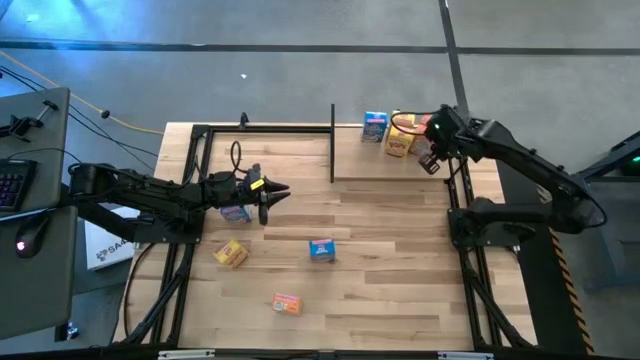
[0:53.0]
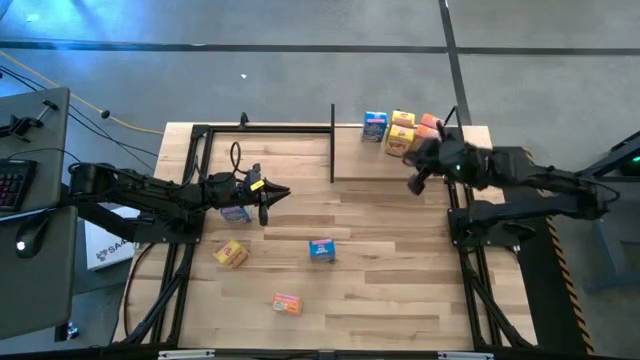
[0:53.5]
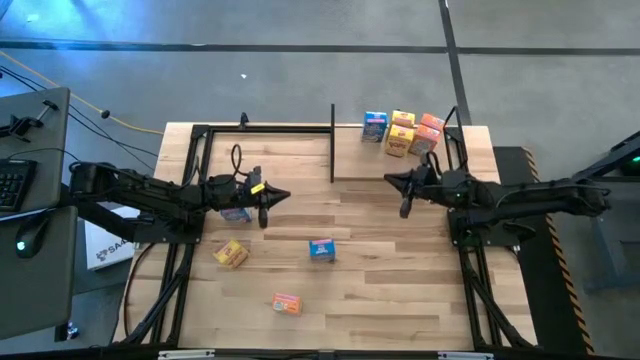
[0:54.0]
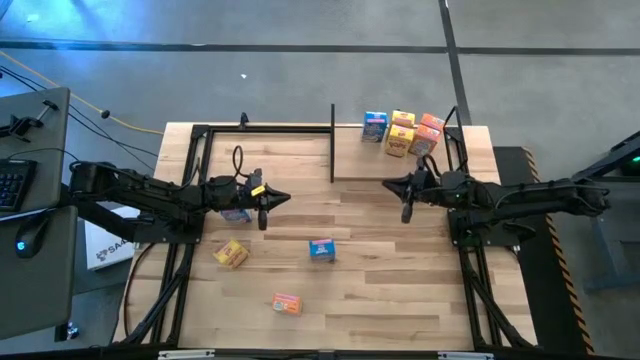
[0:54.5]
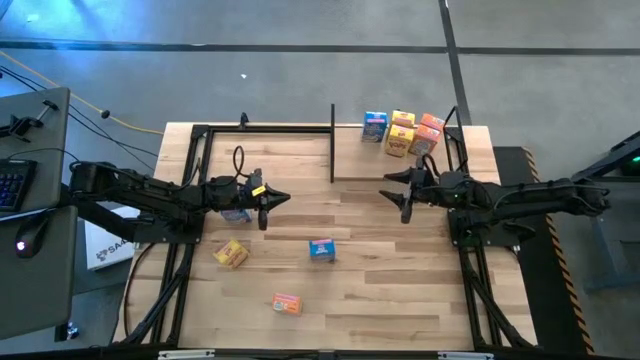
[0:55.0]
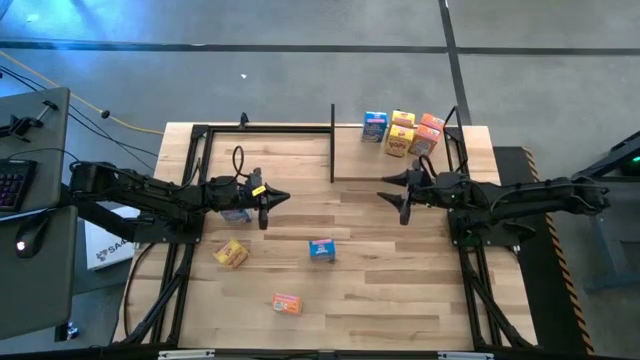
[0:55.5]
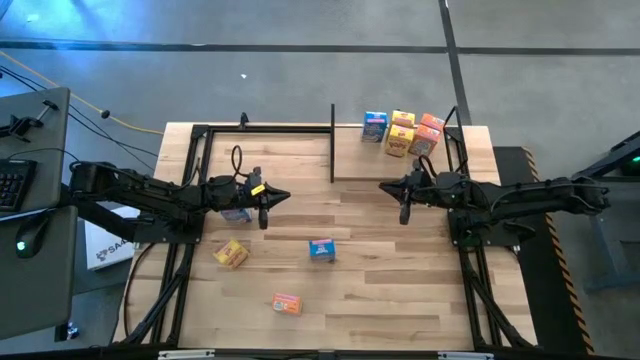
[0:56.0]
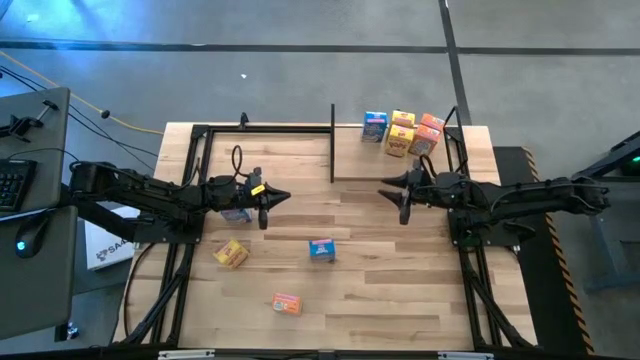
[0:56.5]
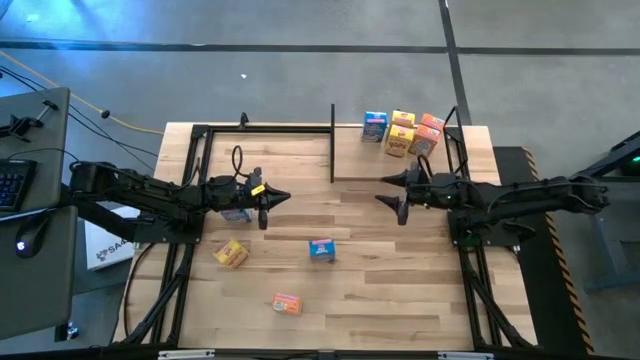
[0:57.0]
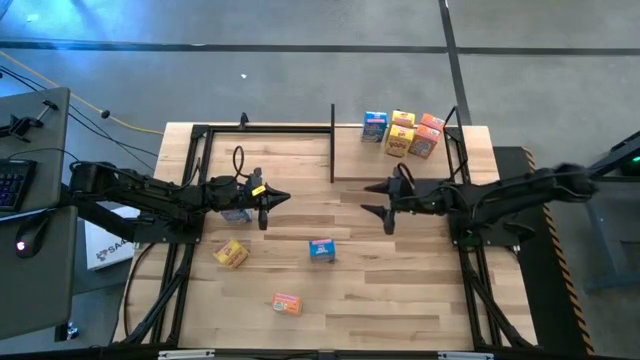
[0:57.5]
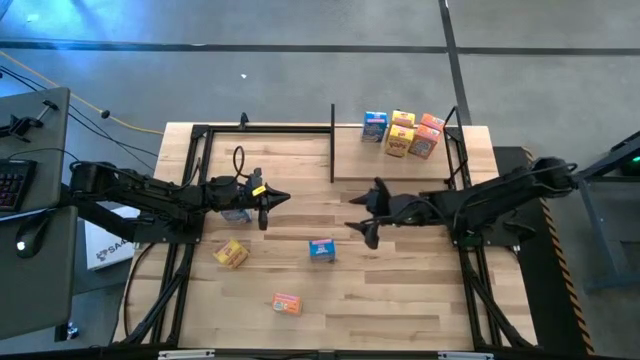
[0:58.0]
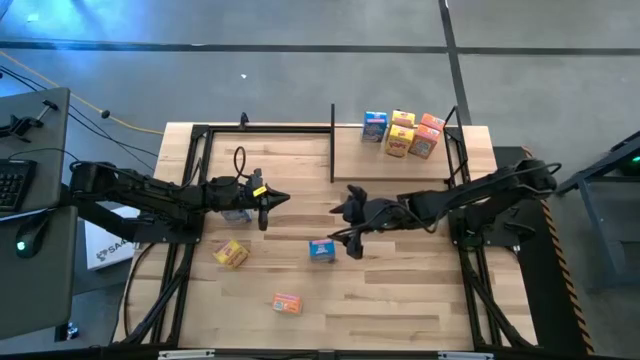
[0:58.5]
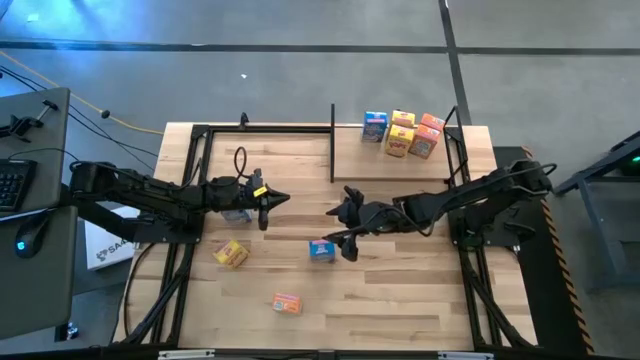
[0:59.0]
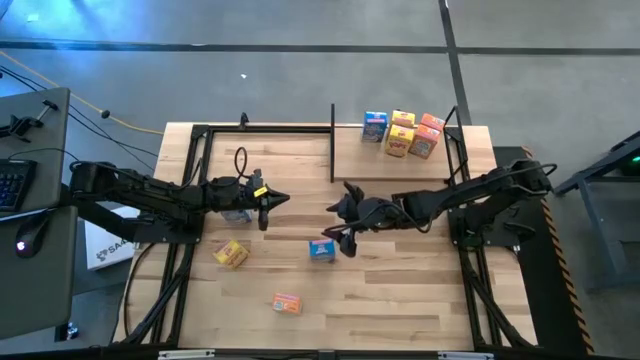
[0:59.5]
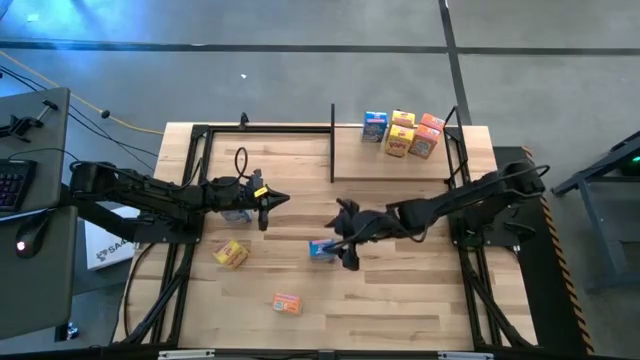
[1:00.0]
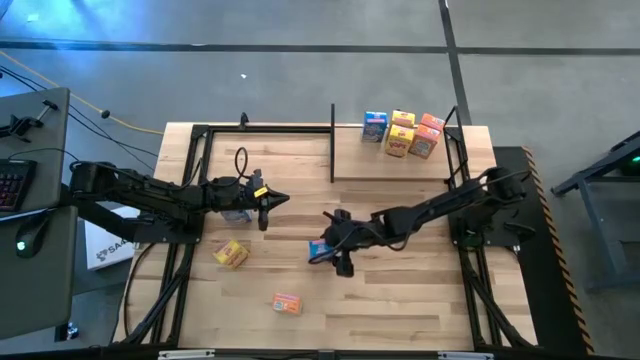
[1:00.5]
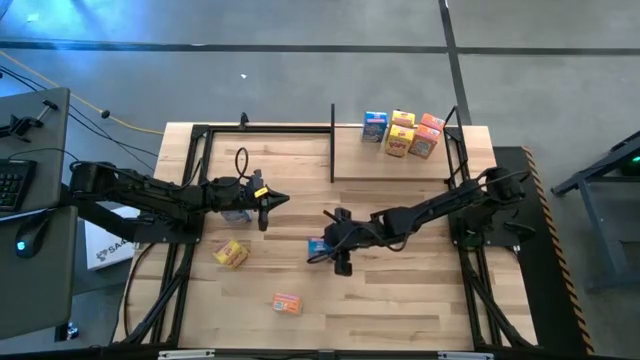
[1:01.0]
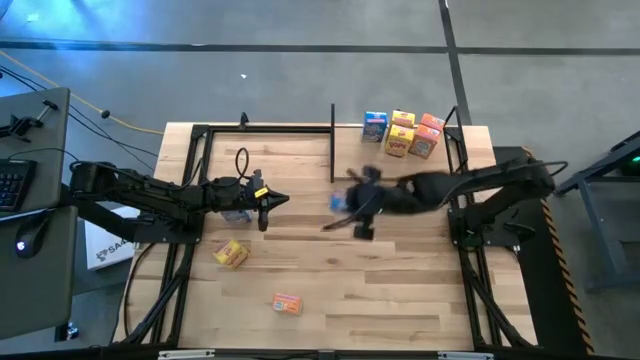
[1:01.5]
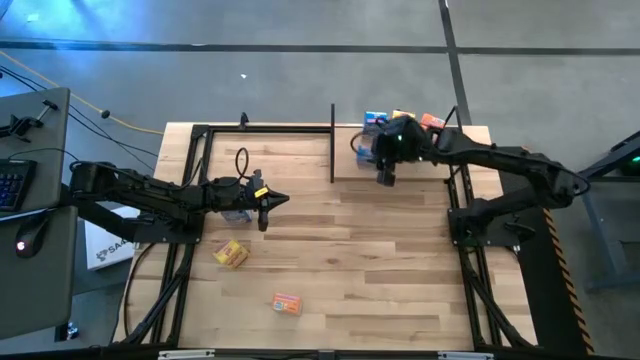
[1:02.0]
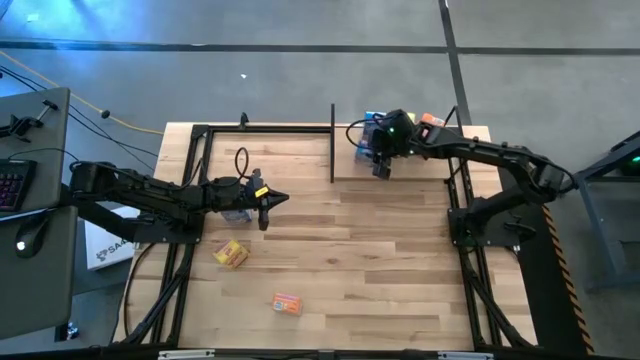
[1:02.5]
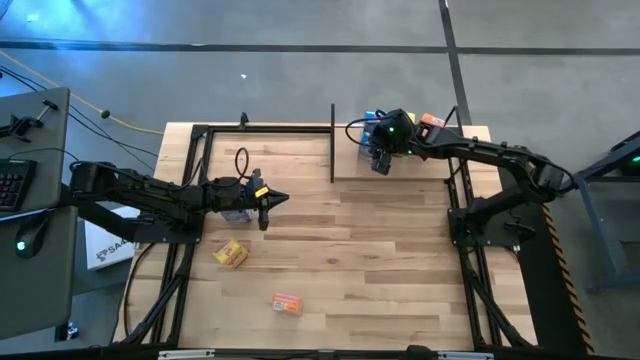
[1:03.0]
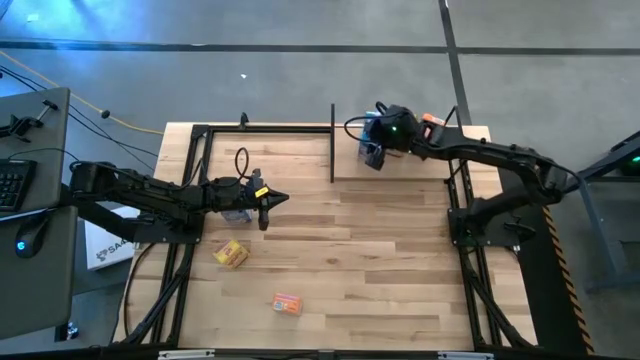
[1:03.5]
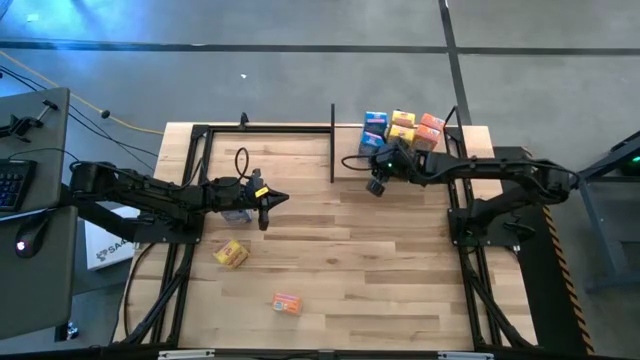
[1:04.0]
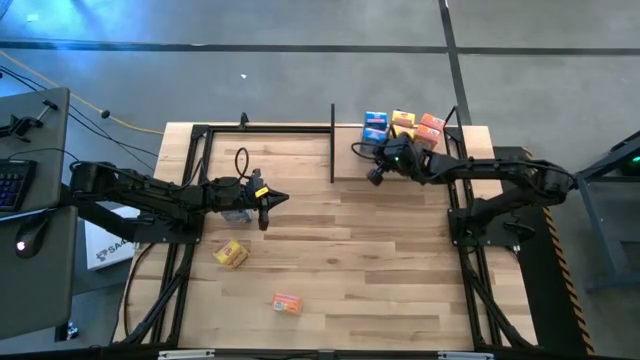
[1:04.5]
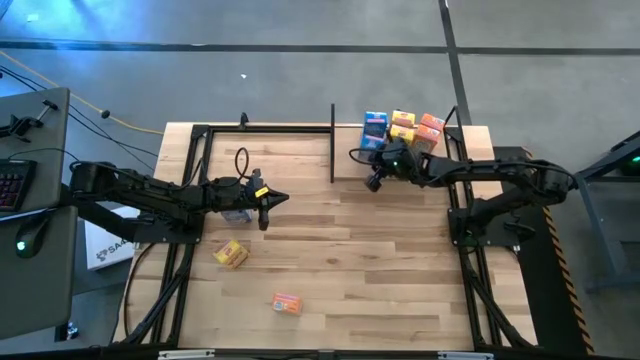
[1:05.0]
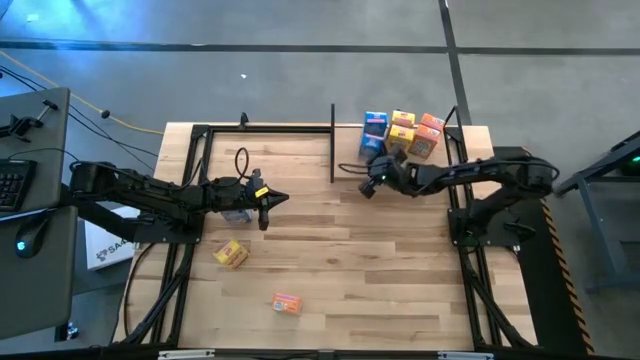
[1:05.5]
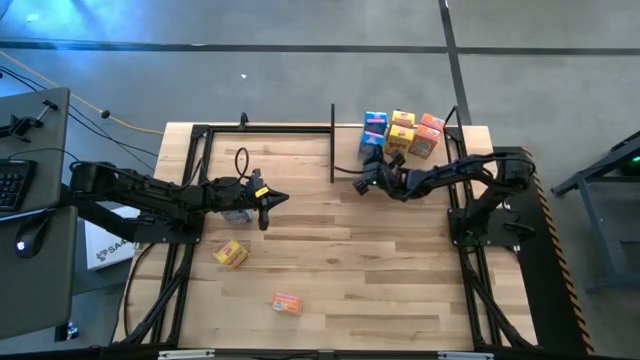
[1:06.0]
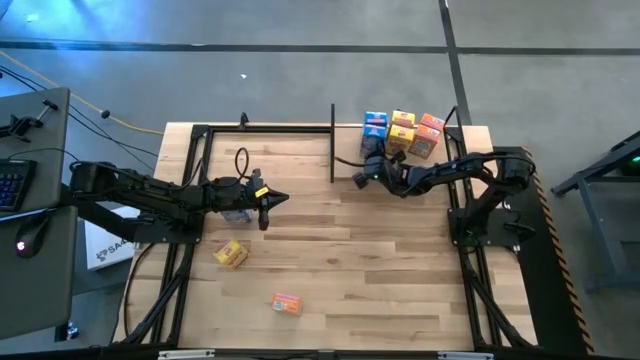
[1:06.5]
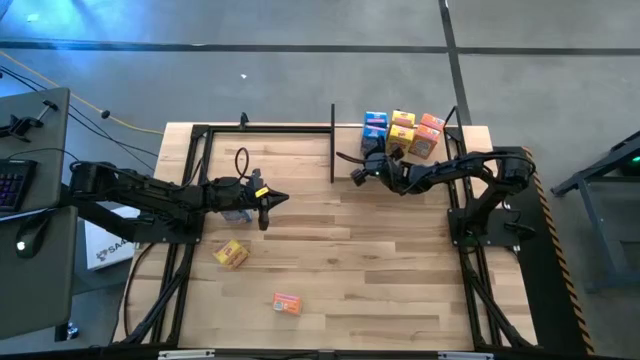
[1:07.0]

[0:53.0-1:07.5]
Task: Stack cereal on shelf
Put the bottom blue cereal box on the shelf aligned with the other yellow cereal box

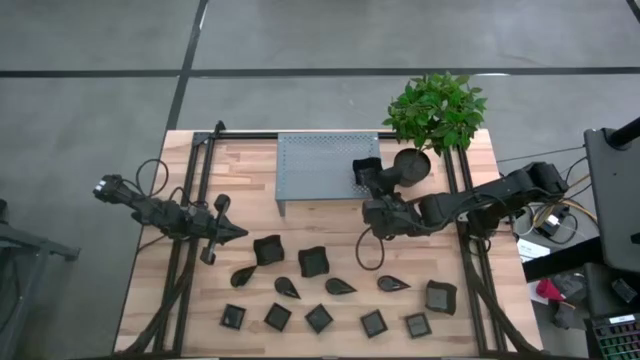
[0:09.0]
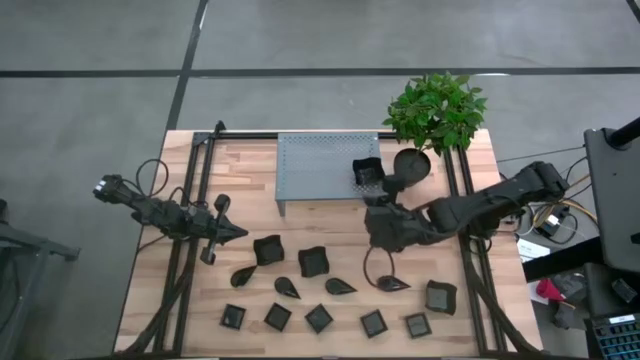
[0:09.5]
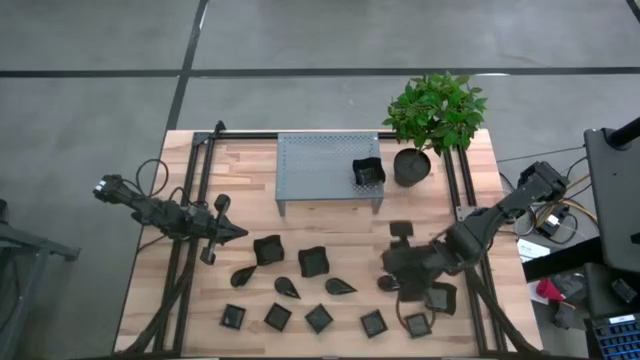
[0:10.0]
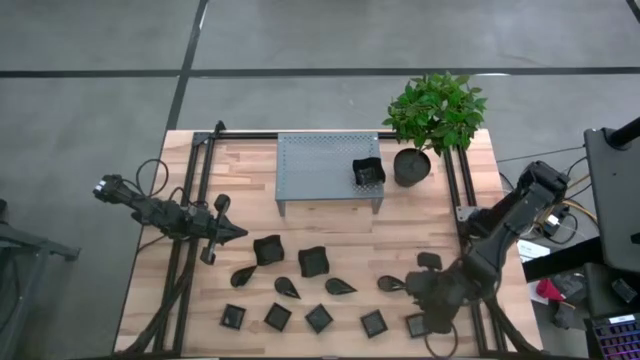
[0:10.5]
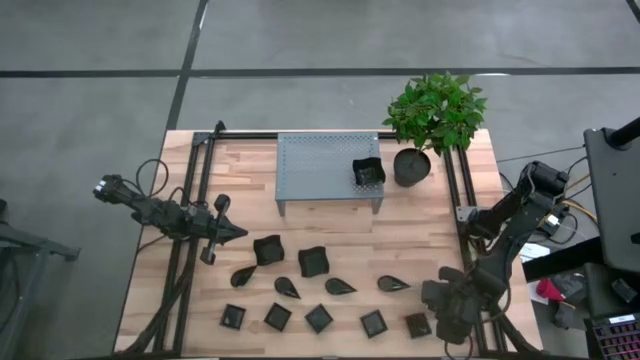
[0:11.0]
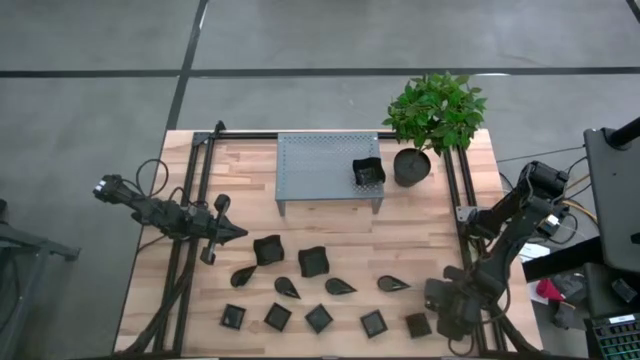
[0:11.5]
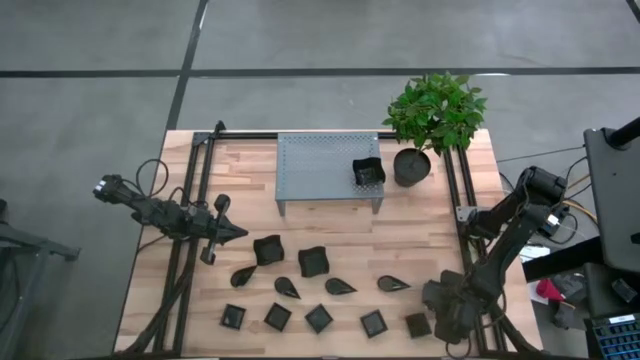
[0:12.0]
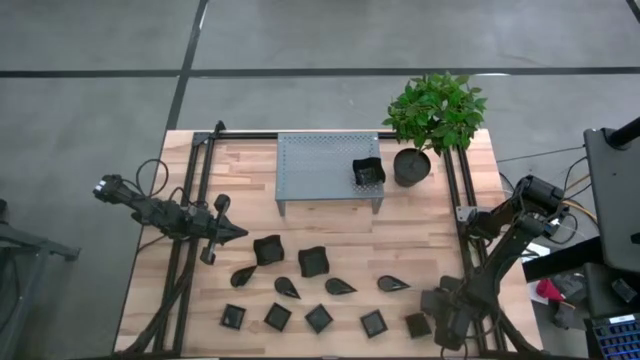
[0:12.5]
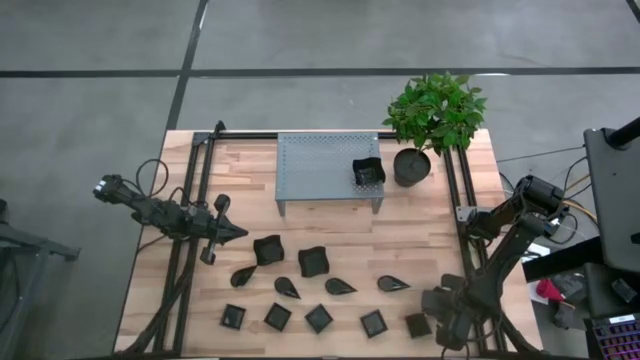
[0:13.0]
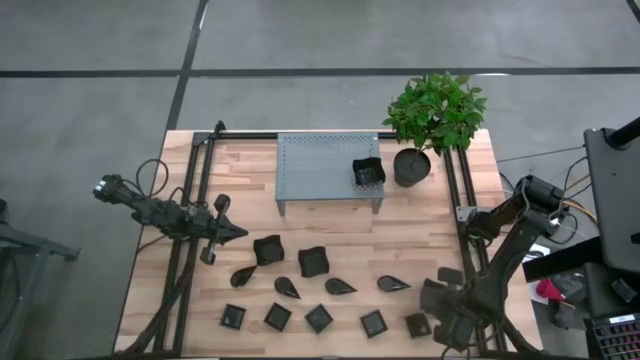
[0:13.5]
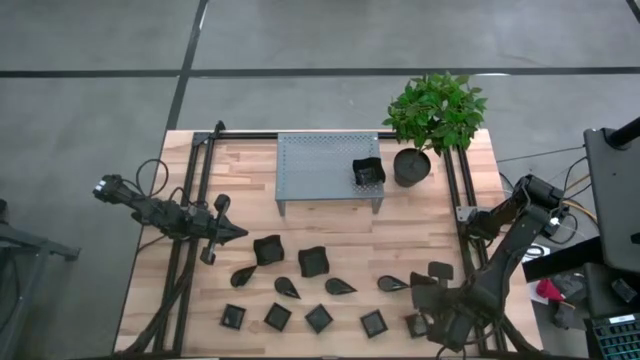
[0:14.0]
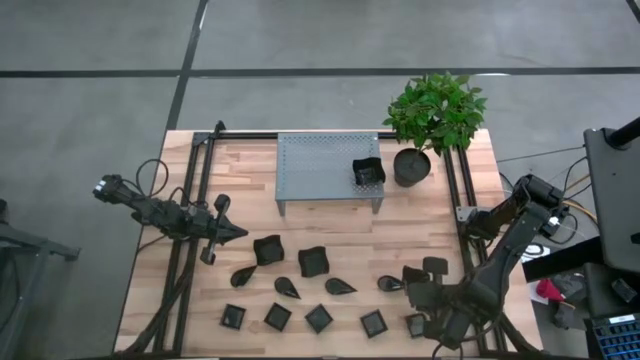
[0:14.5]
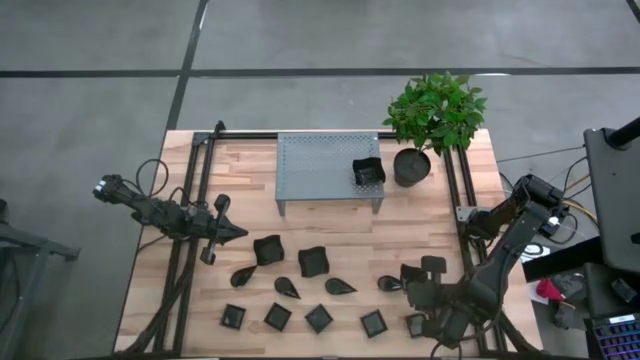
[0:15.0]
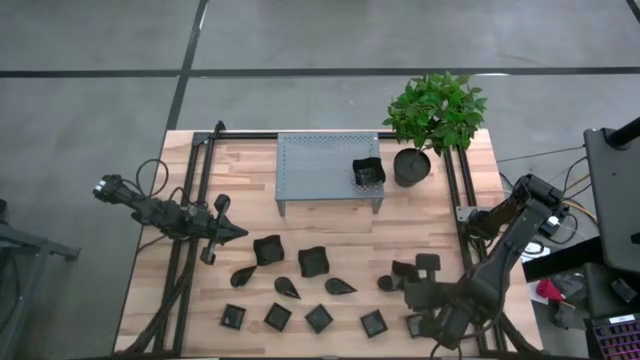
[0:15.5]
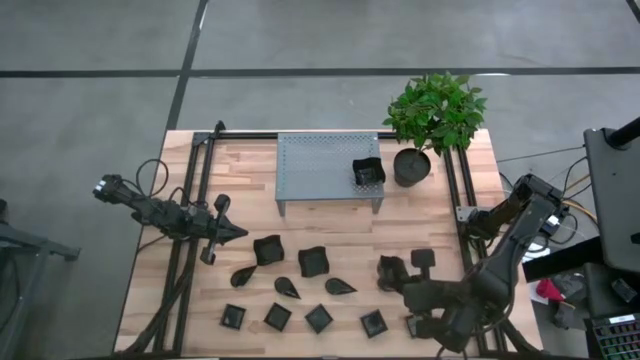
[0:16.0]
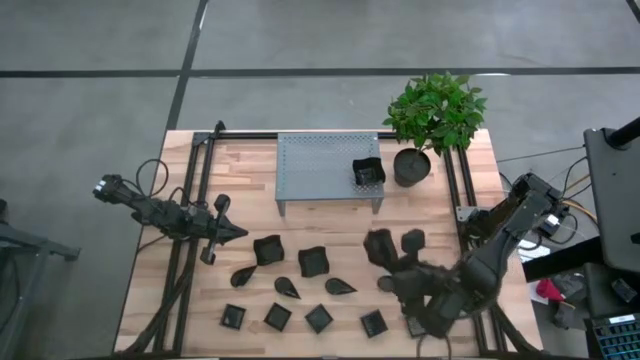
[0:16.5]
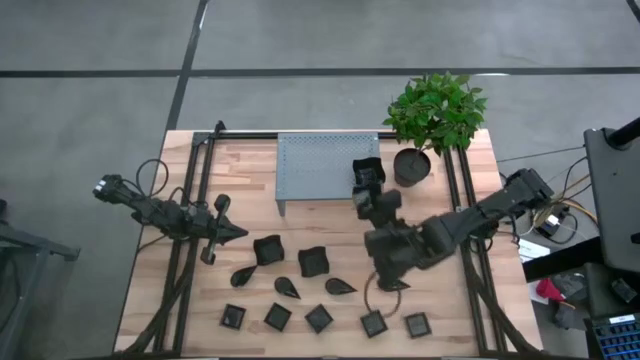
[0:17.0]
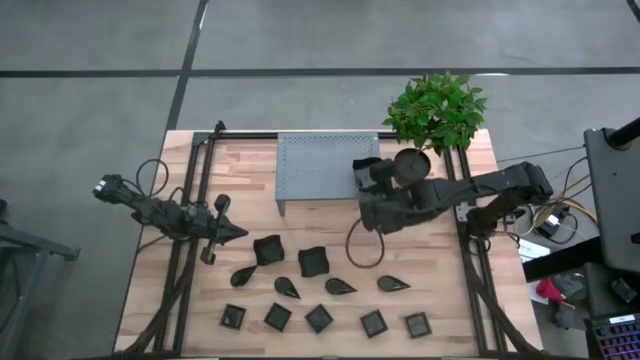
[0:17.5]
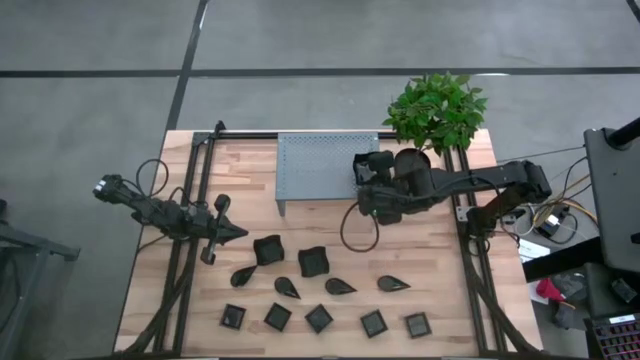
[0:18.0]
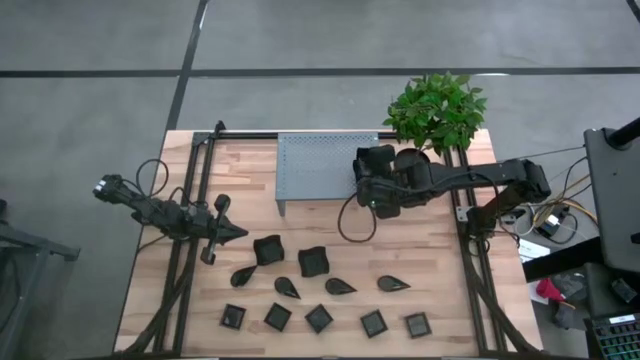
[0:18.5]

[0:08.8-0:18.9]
Task: Pick & Place Mini shaped plates
Stack the black distorted square plate on top of the black distorted square plate on the shelf
